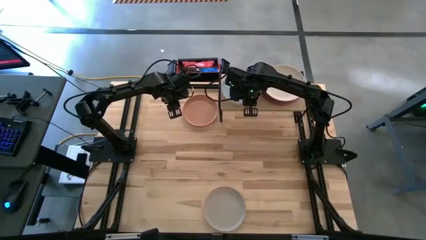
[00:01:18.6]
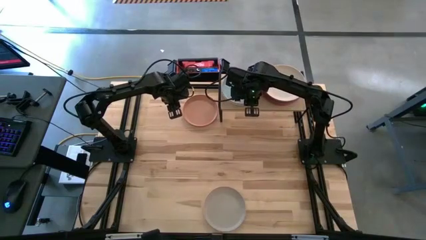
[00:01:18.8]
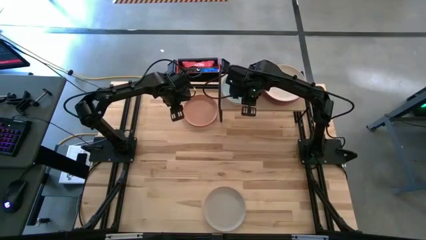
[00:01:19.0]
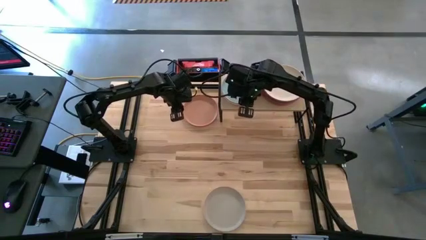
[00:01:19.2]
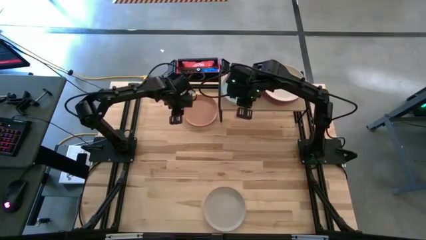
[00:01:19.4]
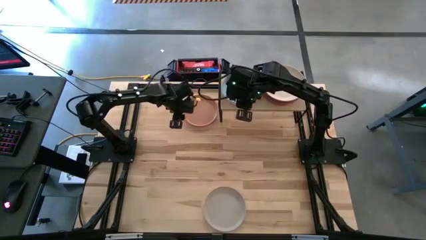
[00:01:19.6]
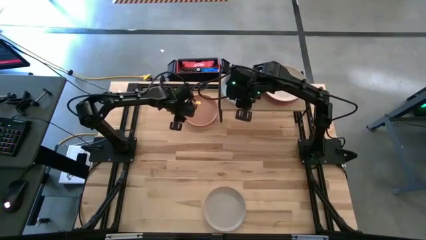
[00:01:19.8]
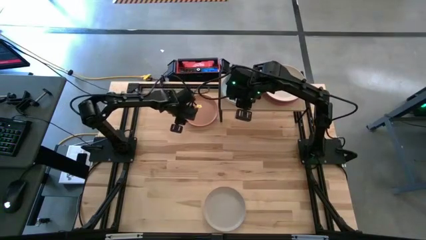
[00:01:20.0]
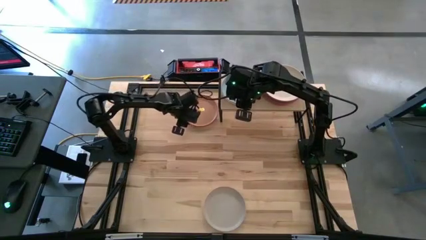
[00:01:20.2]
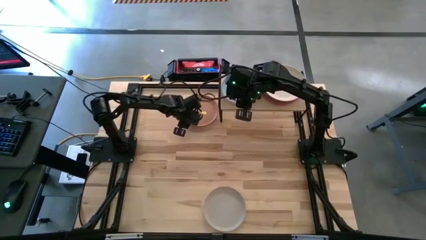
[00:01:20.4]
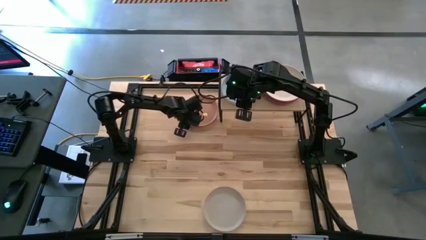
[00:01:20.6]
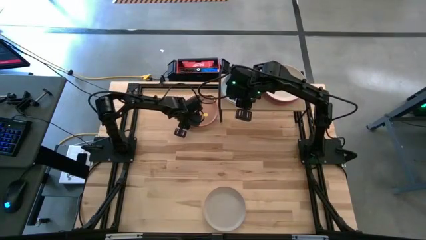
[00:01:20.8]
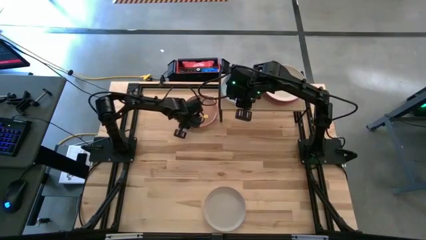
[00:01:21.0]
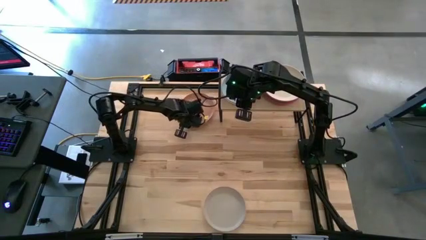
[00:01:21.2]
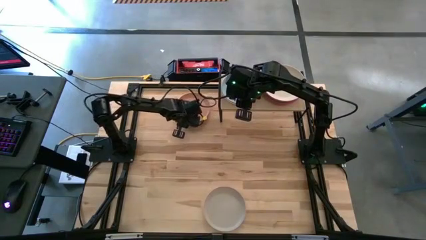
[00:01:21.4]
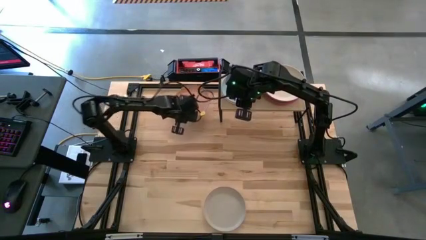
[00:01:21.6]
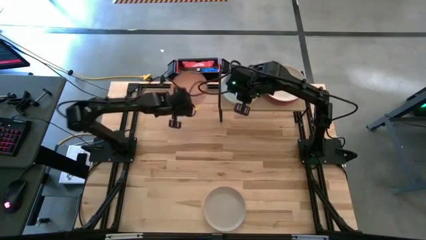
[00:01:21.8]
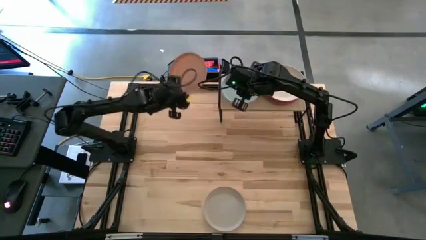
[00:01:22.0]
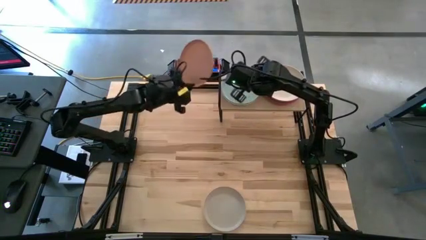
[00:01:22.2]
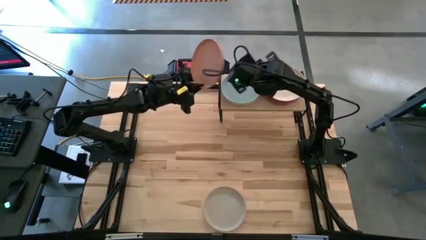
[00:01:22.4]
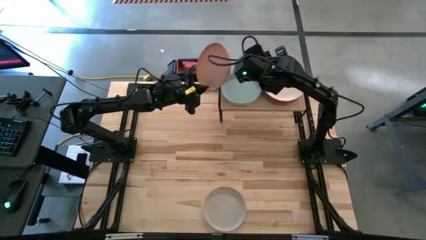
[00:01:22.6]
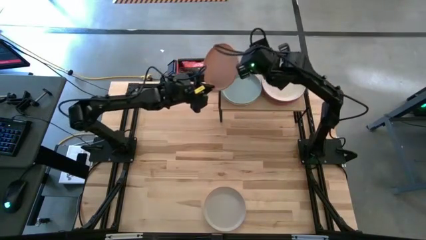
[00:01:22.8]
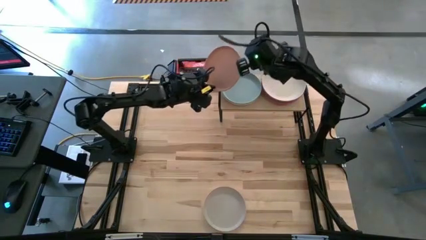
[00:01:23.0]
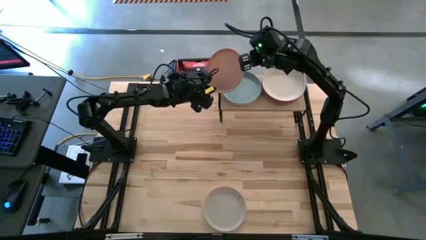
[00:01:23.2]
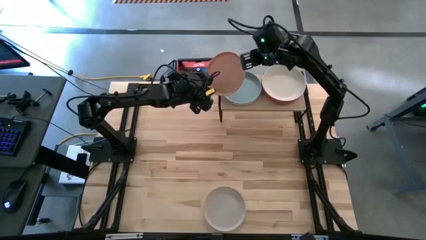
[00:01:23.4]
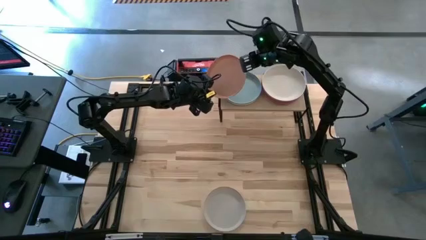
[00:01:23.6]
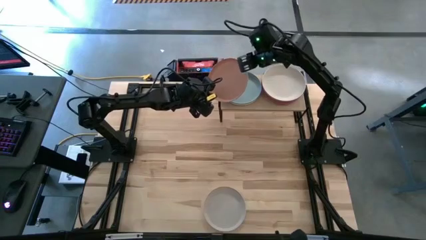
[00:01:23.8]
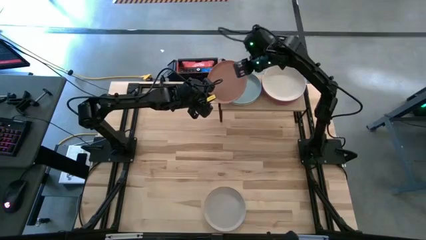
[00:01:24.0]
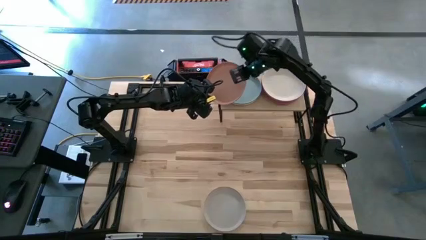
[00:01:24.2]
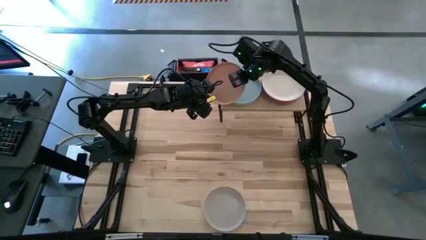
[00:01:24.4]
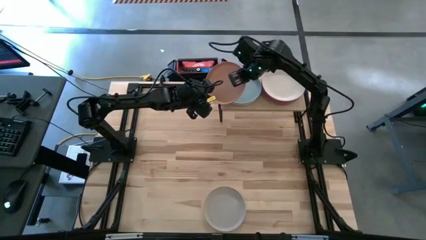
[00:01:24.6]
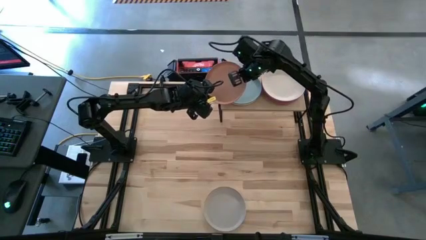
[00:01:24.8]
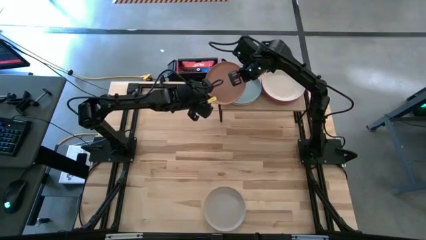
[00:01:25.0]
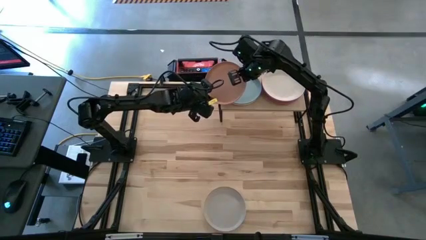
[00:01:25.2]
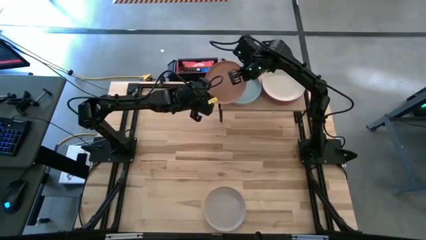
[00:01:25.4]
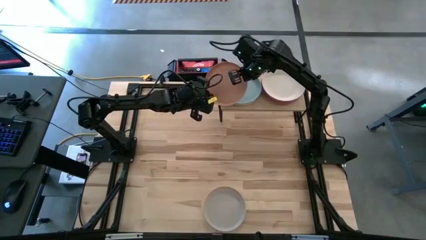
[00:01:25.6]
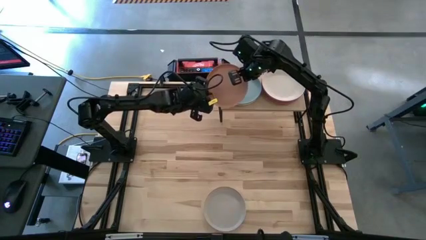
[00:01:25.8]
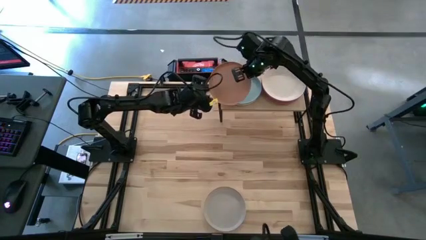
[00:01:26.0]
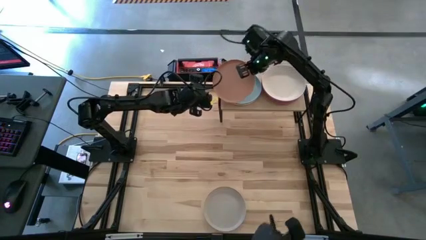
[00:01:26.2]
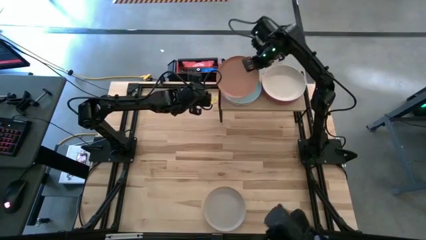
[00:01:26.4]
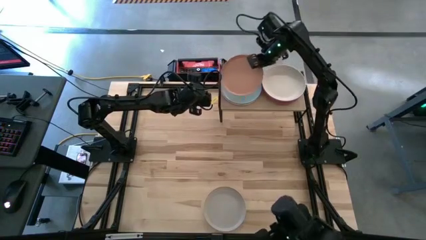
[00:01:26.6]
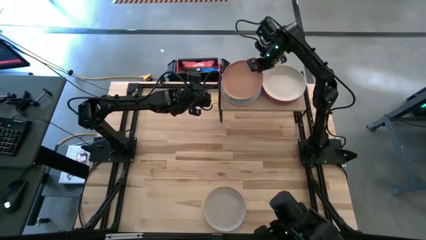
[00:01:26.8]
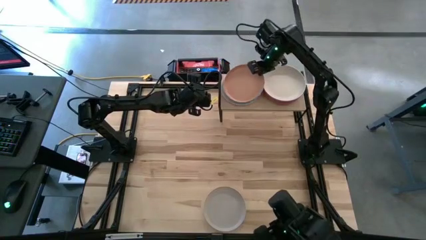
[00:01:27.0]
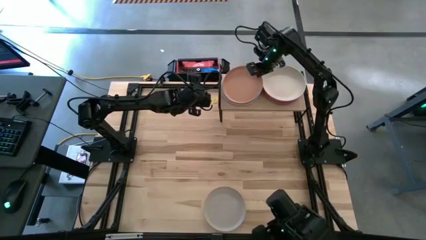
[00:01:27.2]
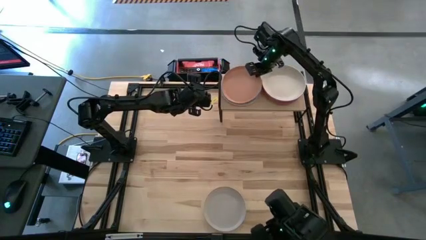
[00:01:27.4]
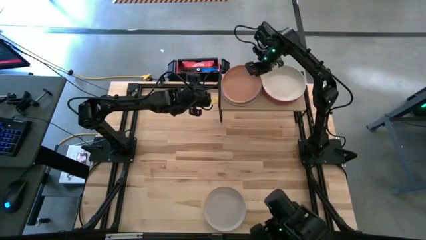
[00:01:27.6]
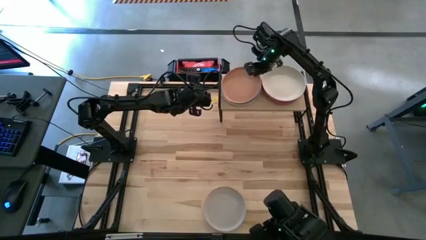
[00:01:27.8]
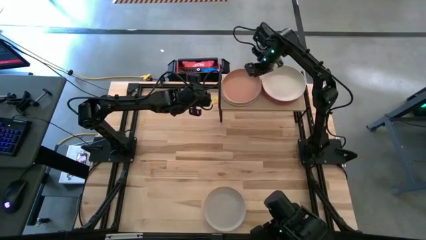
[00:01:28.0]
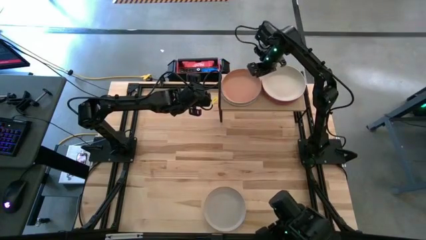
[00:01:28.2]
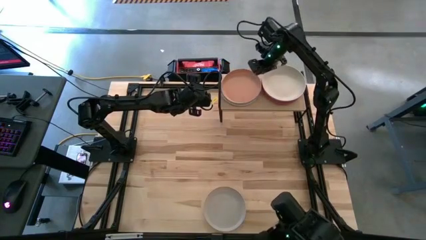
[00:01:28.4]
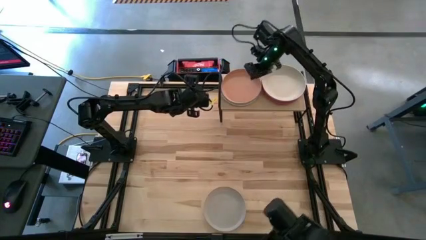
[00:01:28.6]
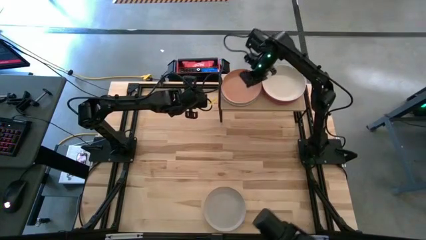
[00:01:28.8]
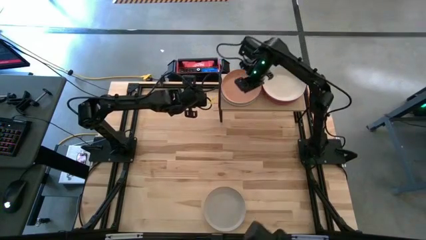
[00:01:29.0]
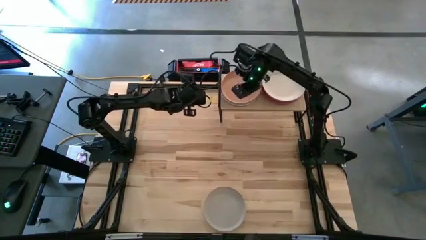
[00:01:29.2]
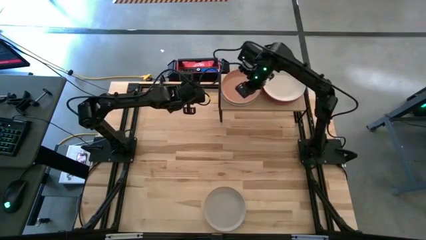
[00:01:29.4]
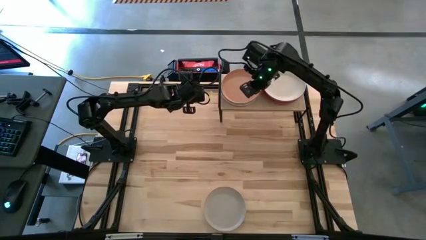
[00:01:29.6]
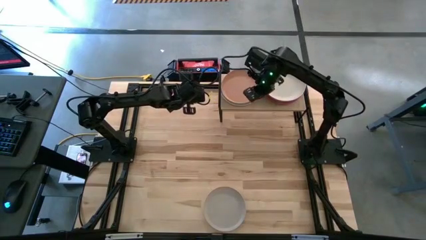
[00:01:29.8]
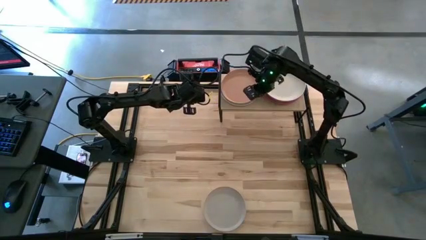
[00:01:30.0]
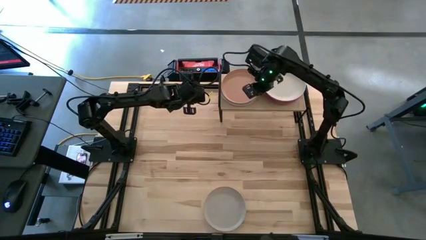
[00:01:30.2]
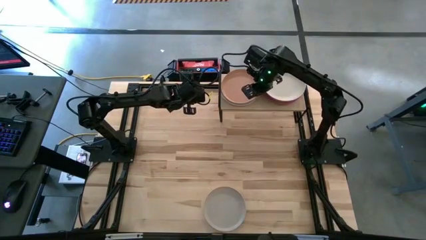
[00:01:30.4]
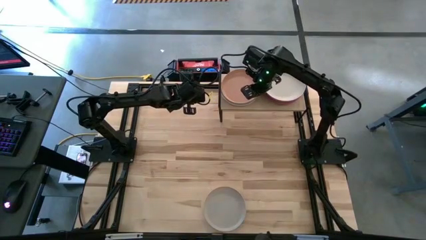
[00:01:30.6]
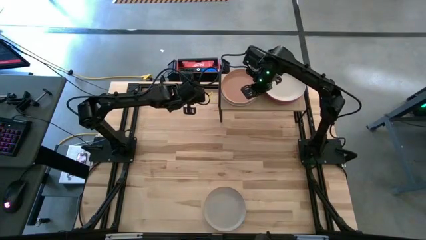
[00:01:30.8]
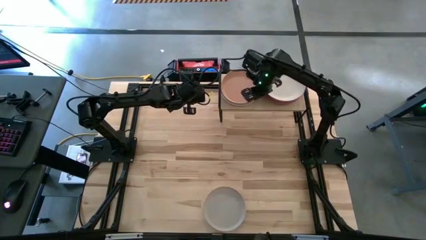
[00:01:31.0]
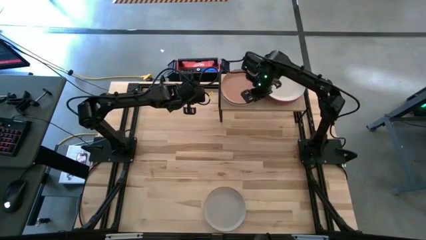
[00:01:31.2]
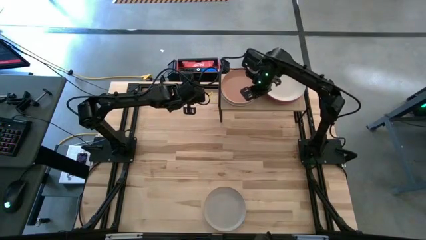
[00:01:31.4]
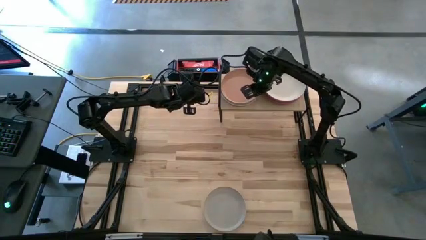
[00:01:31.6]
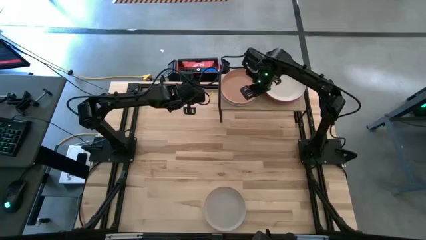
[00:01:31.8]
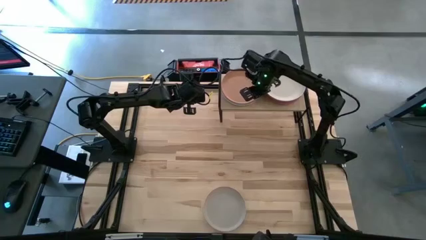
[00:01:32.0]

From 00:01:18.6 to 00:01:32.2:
Task: Place and stack plates onto a shelf
Stack the brown plate on top of the blue plate on the shelf

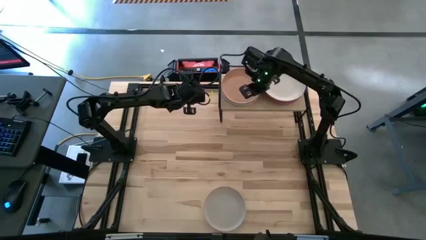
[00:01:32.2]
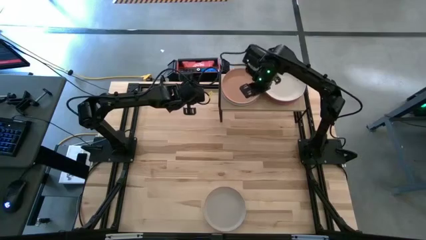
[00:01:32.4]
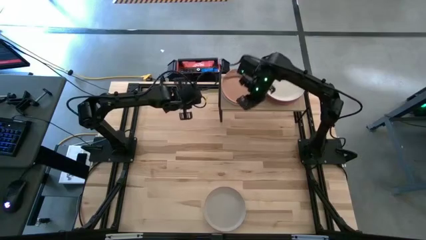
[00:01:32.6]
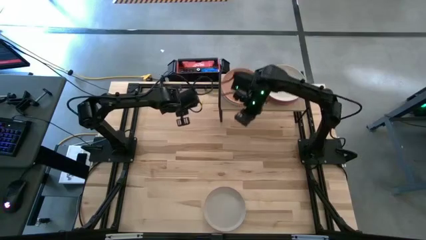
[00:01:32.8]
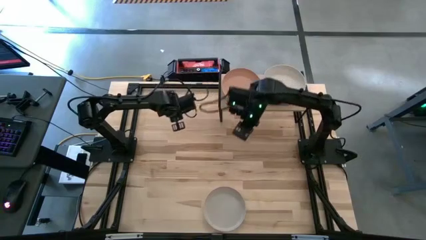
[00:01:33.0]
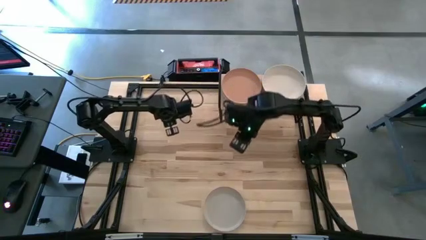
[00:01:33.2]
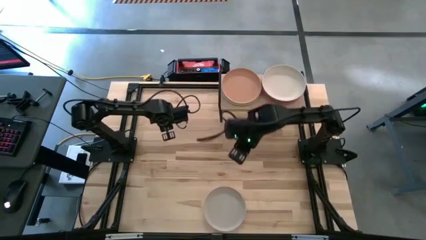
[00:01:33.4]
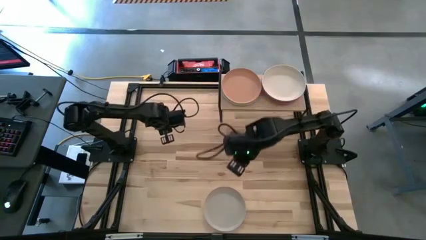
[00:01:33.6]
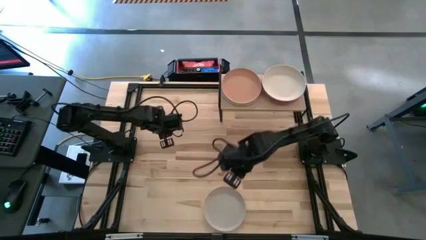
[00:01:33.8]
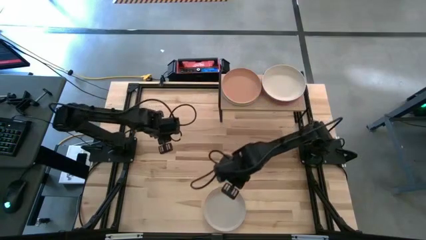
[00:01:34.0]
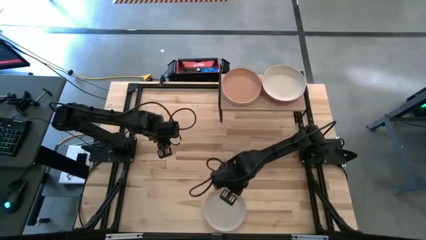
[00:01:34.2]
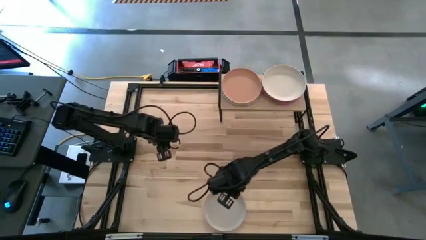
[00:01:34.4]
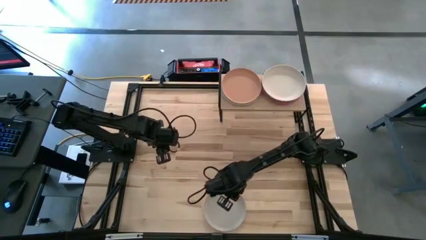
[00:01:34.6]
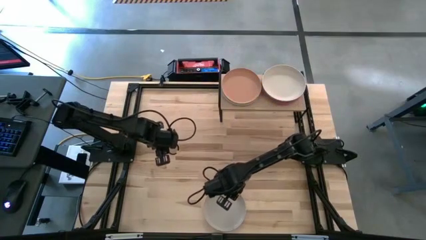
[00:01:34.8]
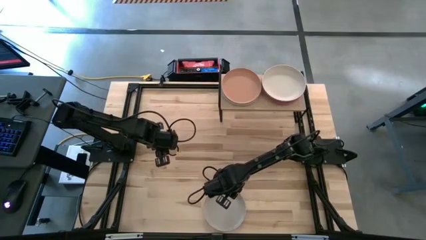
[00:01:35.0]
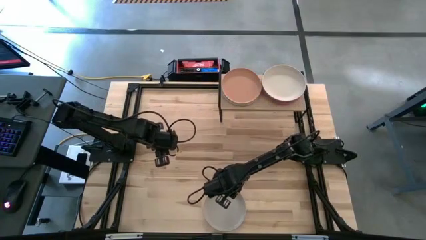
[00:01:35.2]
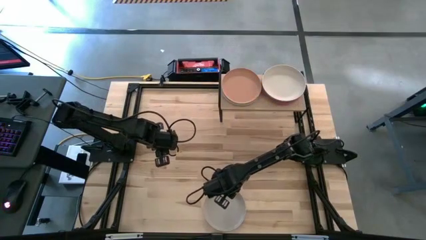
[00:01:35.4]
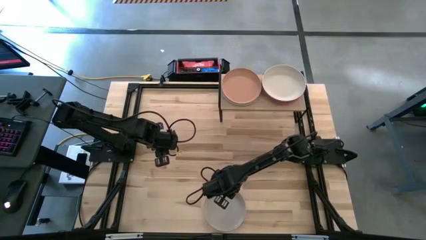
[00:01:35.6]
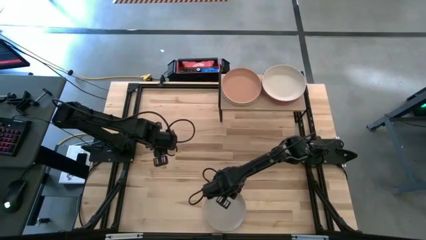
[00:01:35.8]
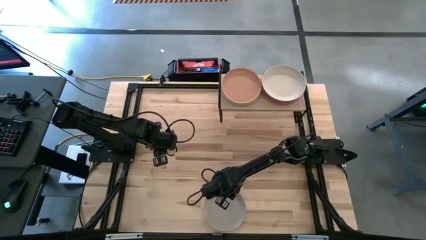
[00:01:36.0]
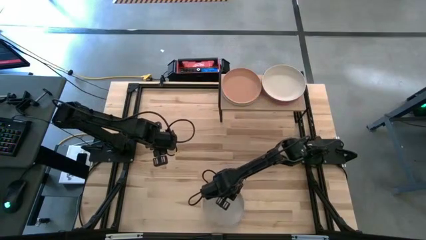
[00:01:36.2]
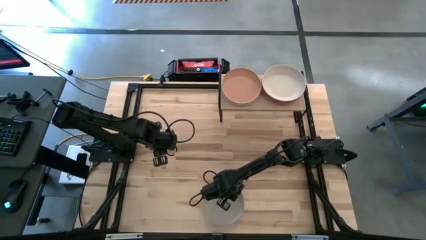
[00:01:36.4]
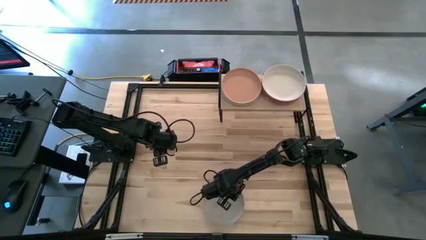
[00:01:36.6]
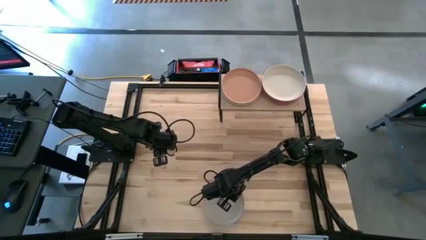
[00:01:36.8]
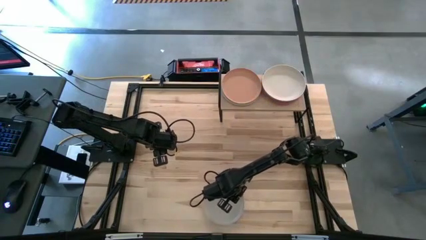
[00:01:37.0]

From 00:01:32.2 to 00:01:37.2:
Stack the gray plate on top of the brown plate on the shelf
